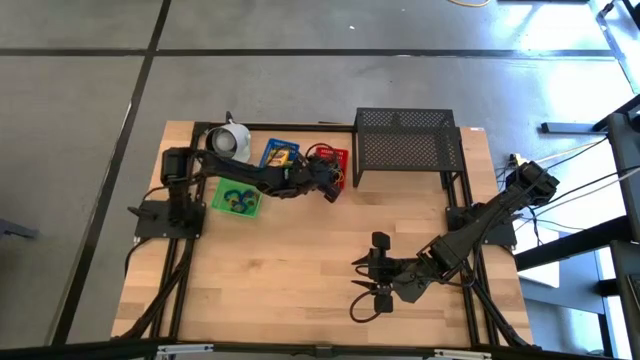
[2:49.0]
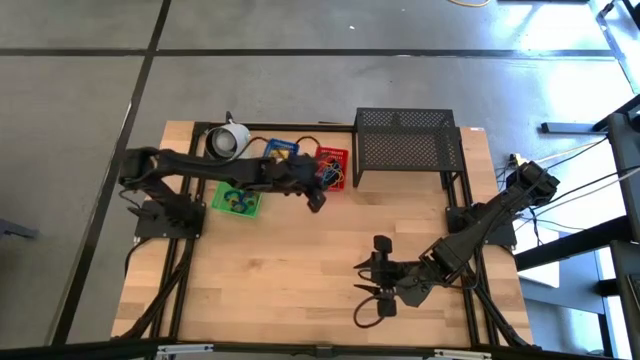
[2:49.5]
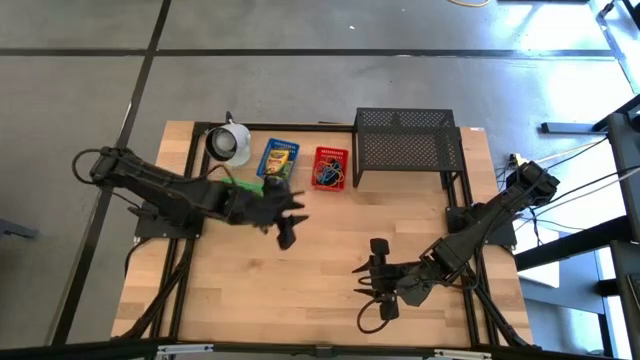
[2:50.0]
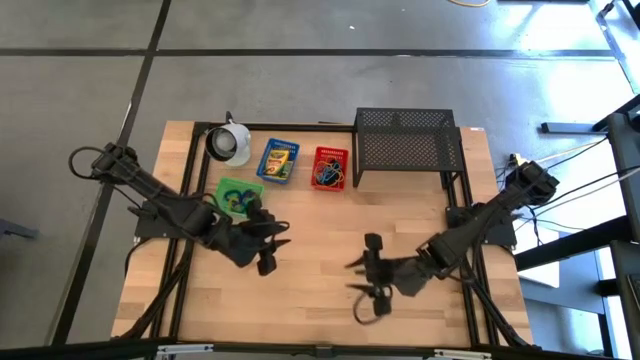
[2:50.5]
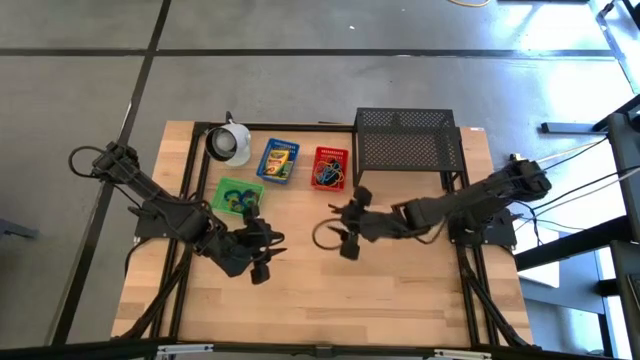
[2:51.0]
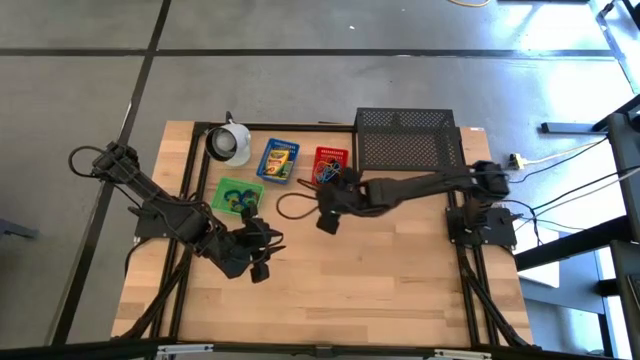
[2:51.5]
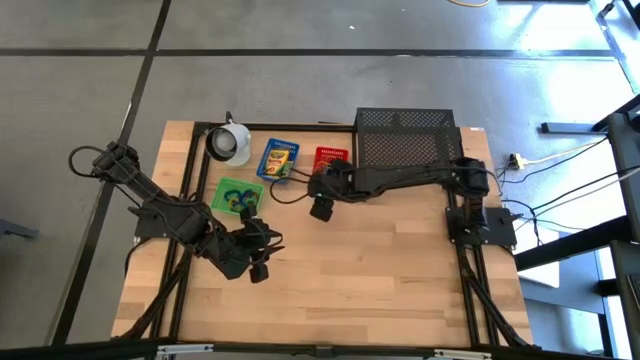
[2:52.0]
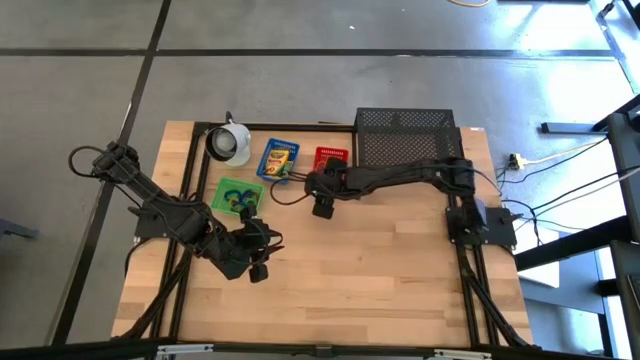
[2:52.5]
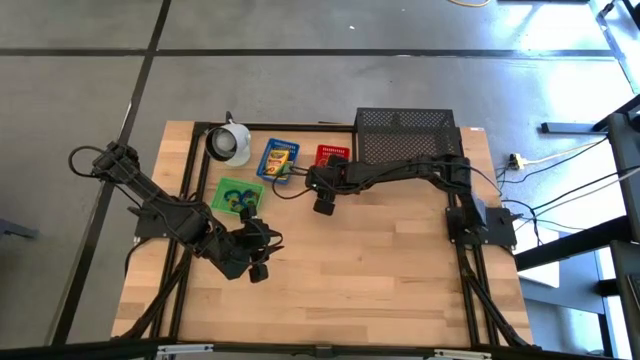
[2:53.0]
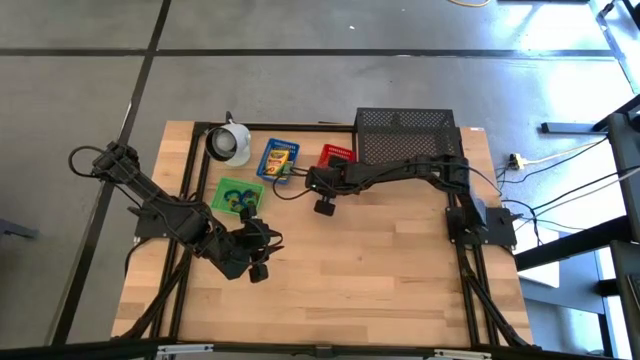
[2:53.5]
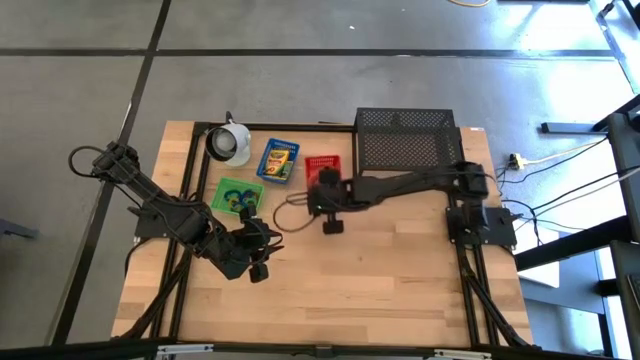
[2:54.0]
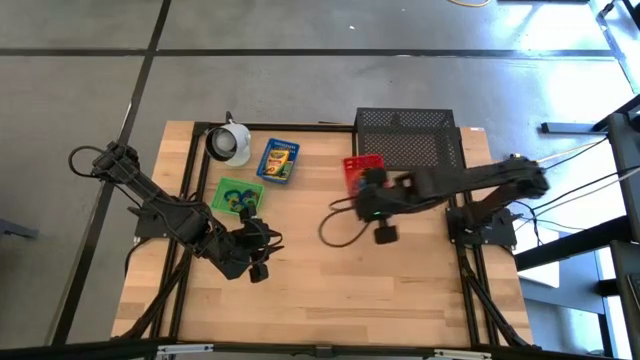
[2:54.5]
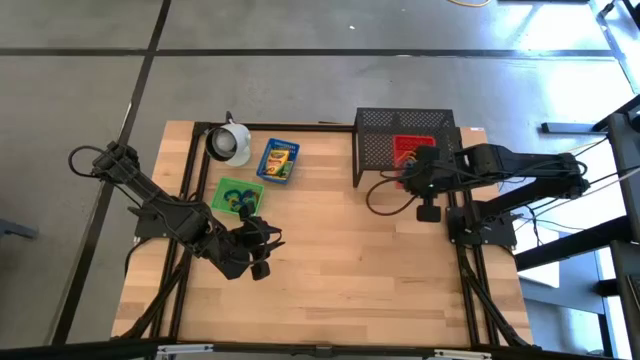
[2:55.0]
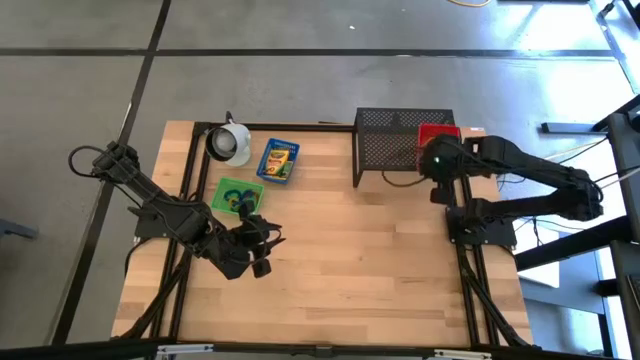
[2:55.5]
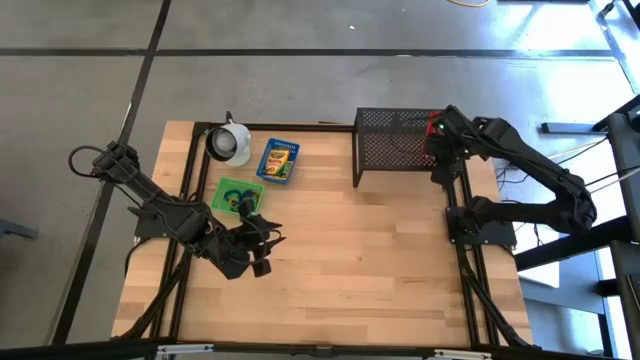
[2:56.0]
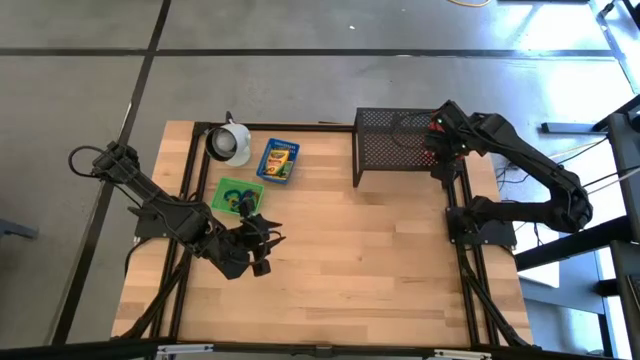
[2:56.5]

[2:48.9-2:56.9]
Task: Pick & Place Office Desk Supplies
Put the red bin containing rubber bands on the shelf

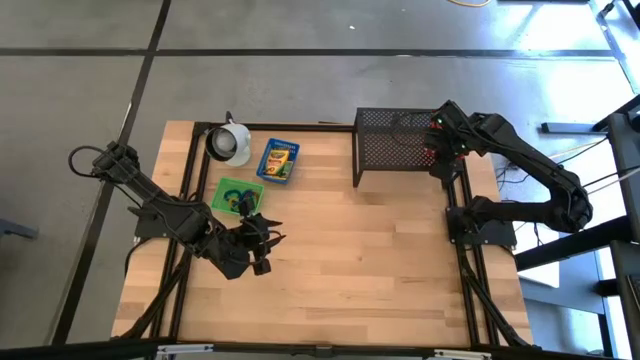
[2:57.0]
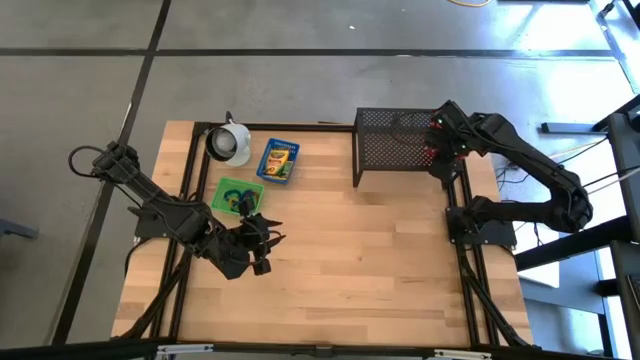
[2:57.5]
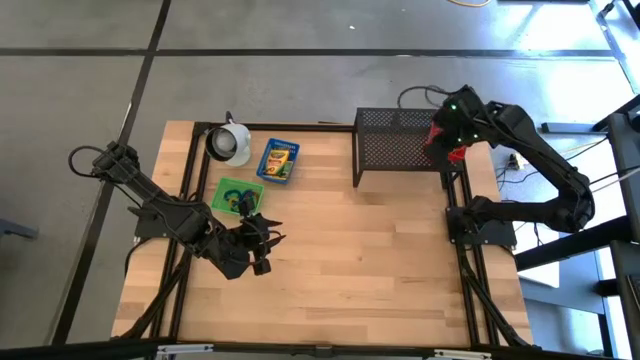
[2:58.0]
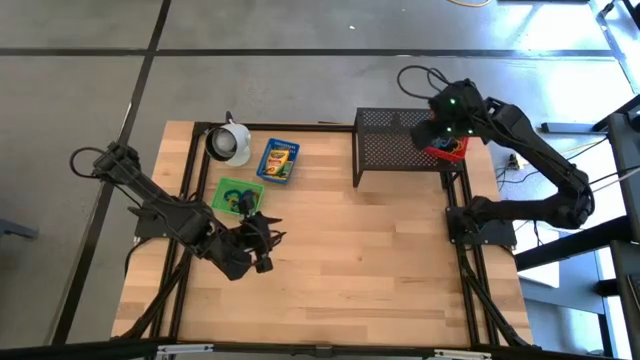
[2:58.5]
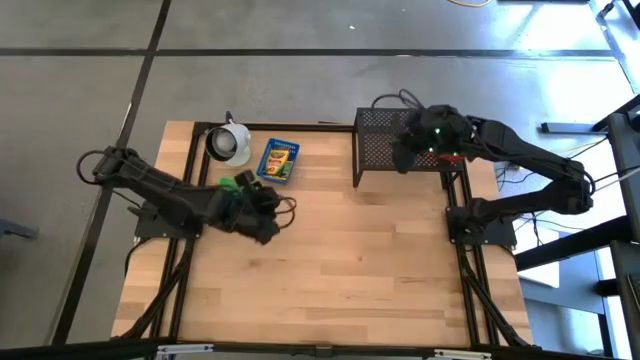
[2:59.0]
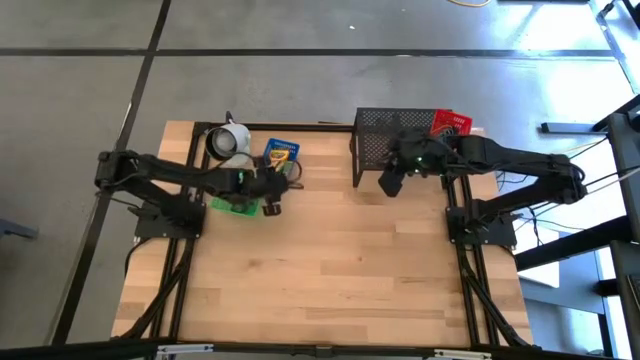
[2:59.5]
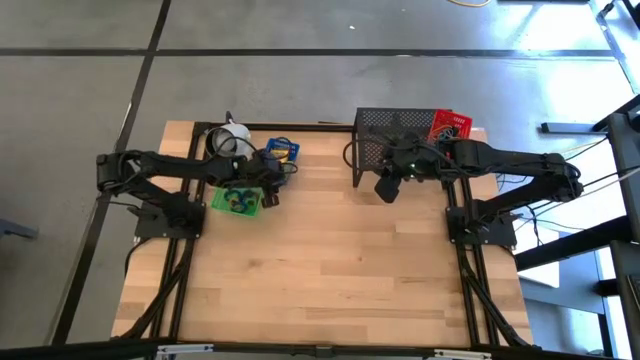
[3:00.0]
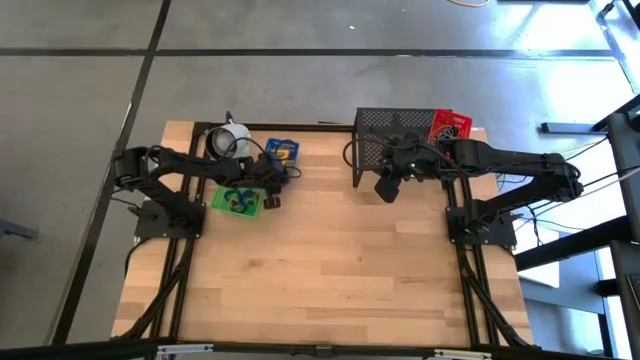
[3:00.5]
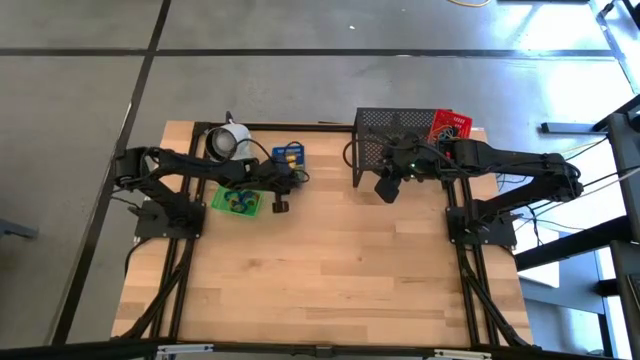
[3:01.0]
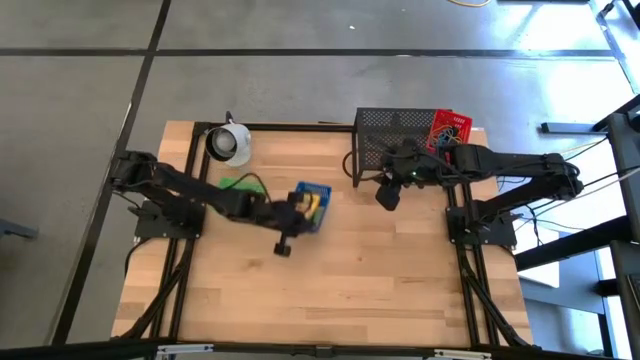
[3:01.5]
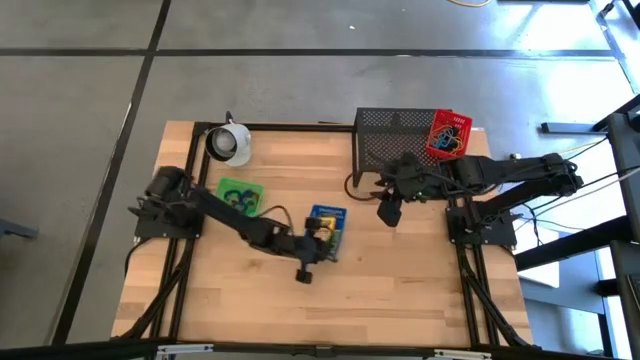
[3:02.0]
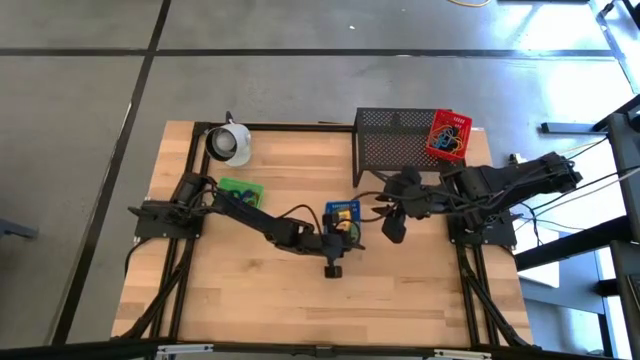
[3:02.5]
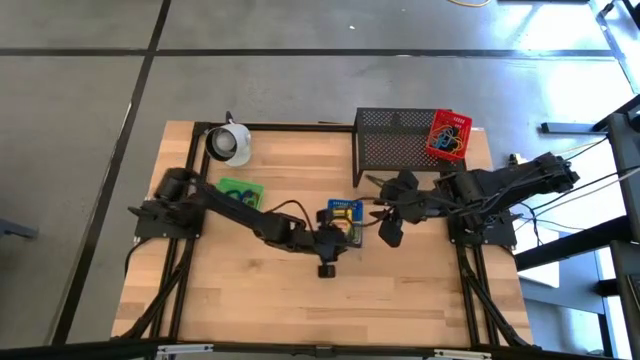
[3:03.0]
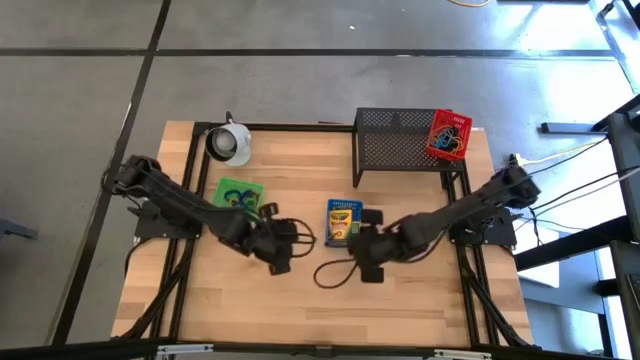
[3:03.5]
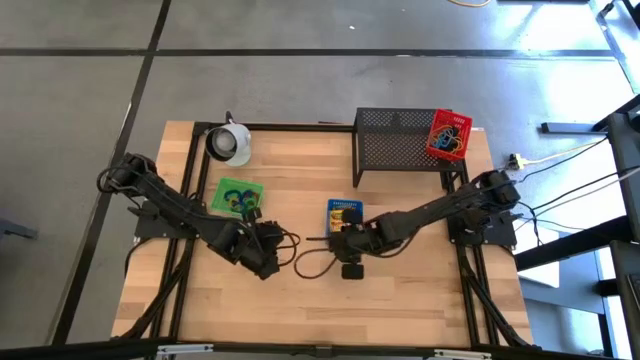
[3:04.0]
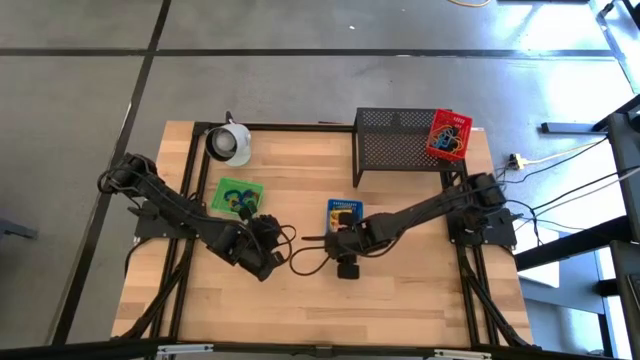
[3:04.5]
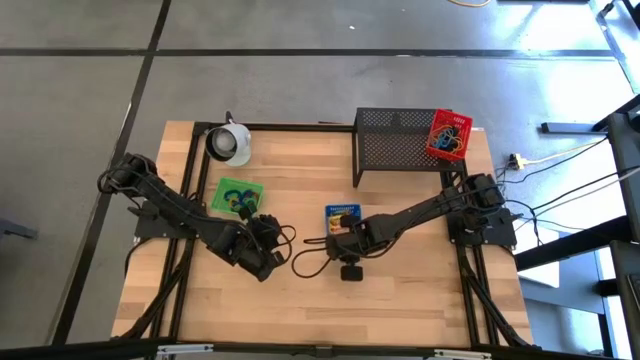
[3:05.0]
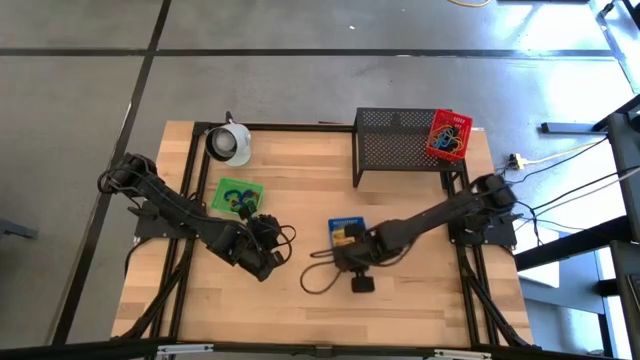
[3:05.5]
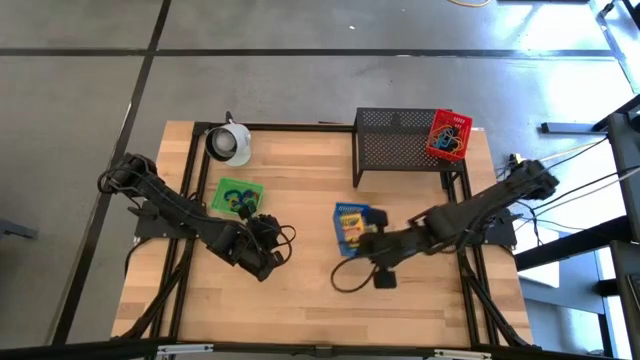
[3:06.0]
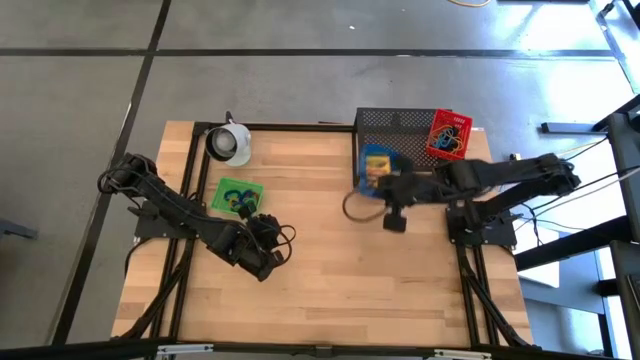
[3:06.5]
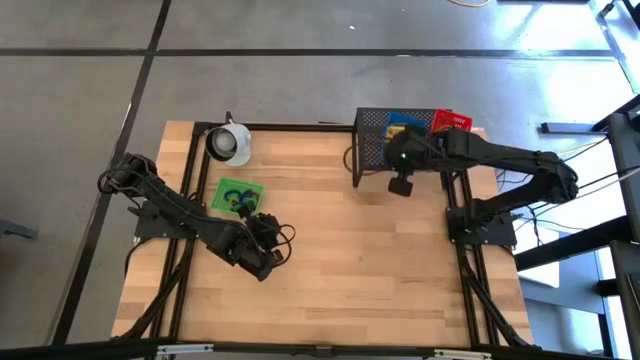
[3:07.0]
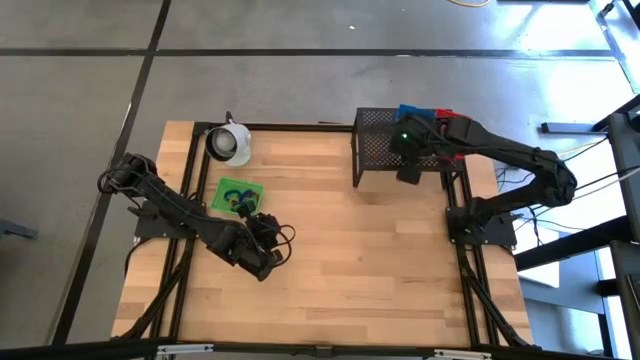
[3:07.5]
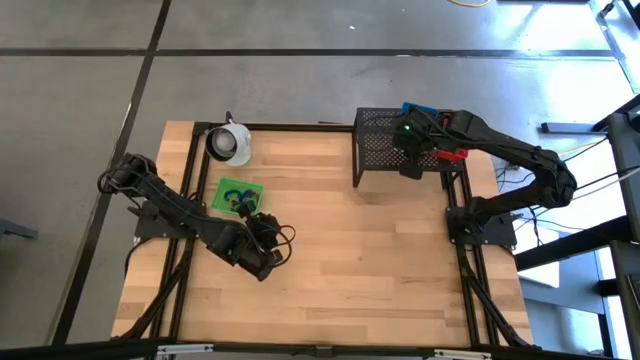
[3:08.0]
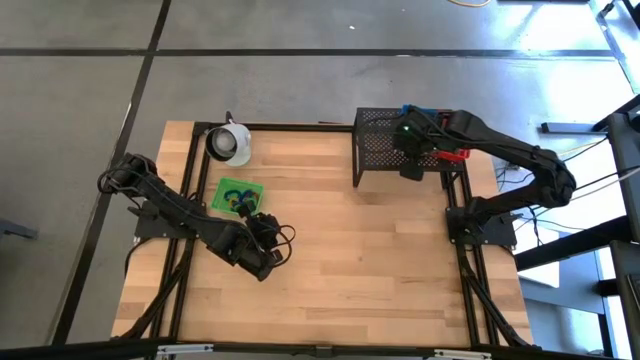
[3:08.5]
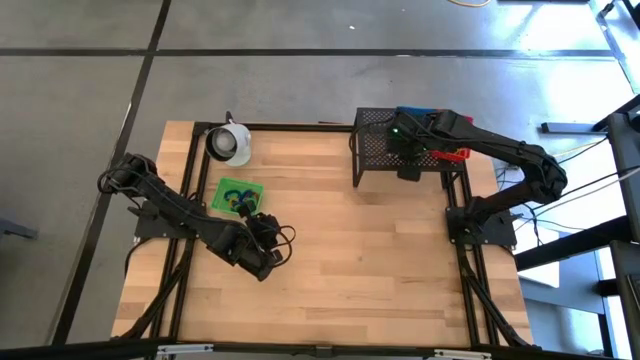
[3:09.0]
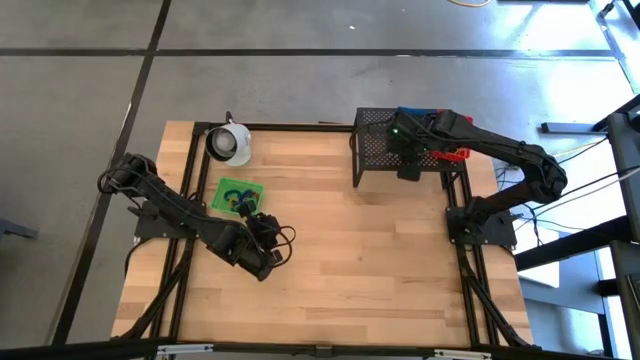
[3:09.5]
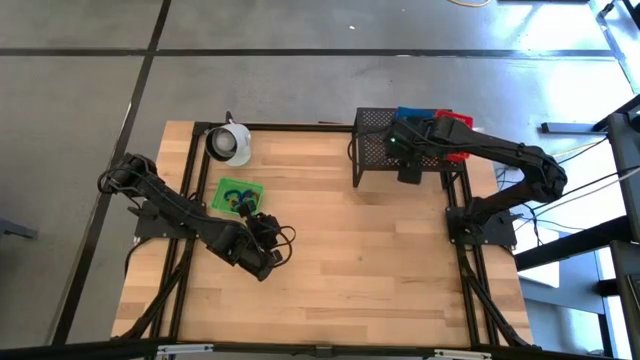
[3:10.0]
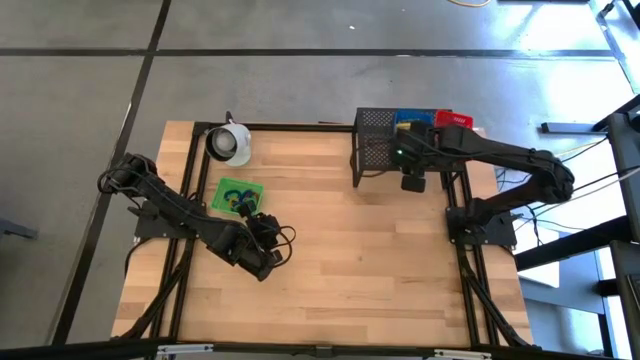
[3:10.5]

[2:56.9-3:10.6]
Put the blue bin containing crayon boxes on the shelf

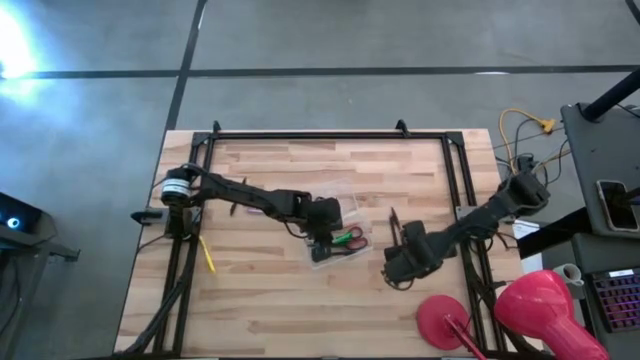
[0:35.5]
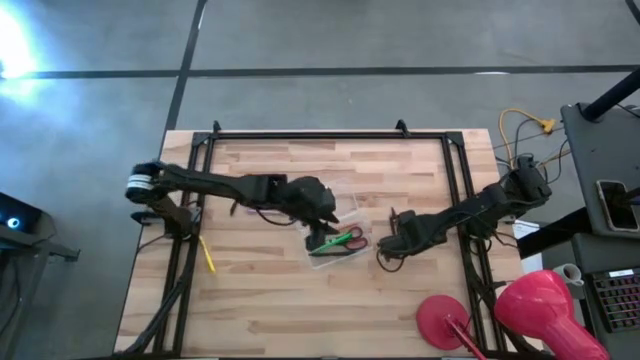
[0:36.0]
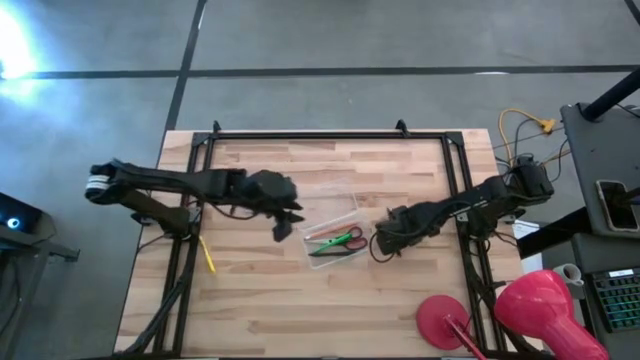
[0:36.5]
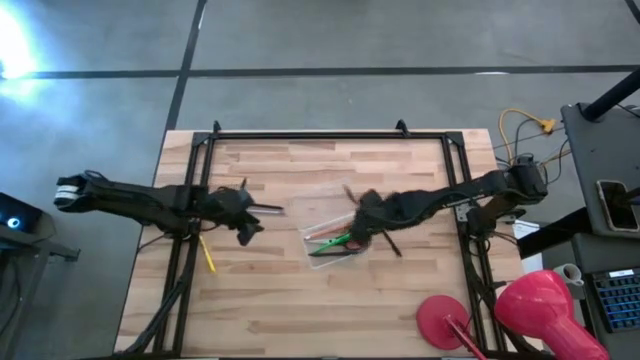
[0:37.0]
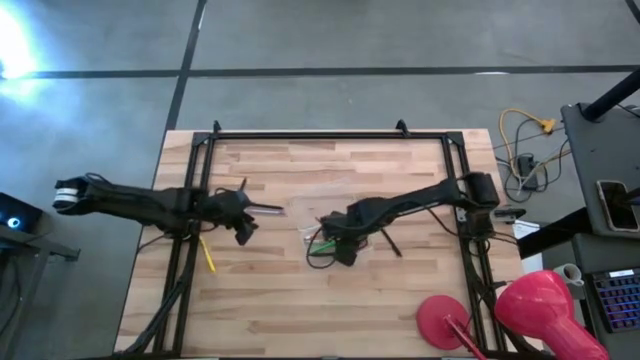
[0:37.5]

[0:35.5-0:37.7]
Task: Pick & place school supplies into a supply box
Put the brown pen into the transparent supply box
